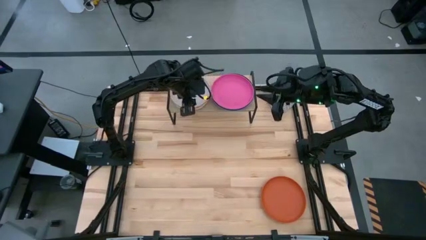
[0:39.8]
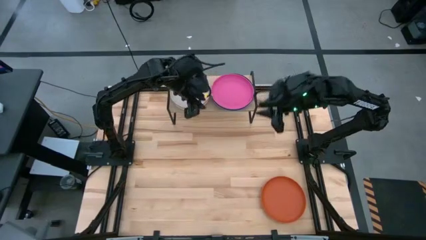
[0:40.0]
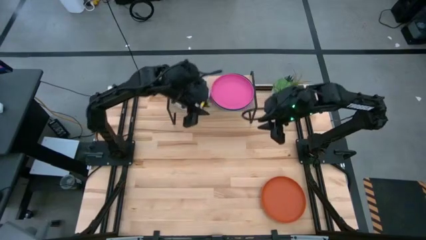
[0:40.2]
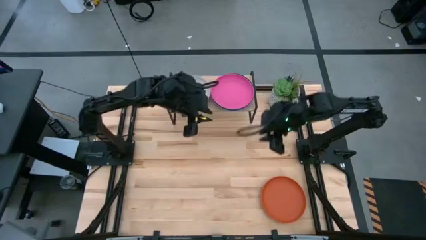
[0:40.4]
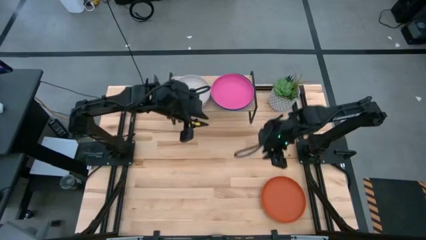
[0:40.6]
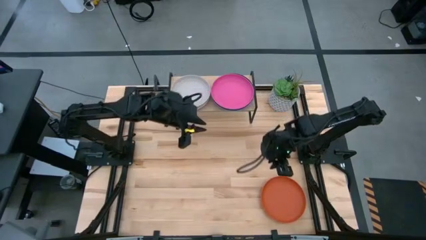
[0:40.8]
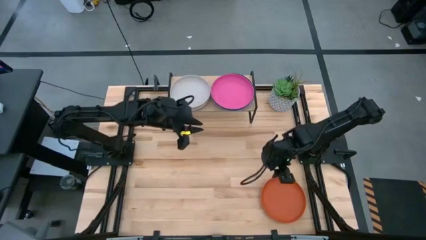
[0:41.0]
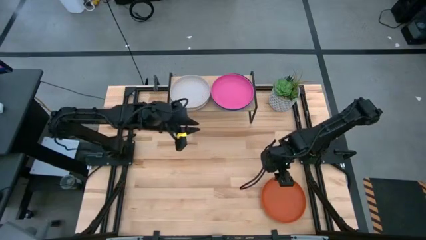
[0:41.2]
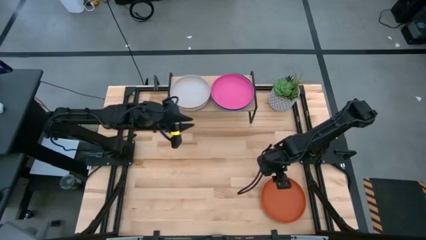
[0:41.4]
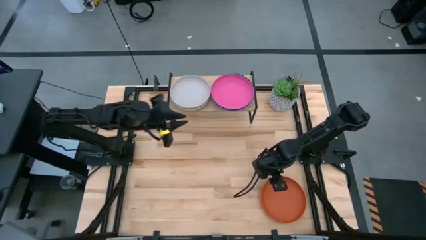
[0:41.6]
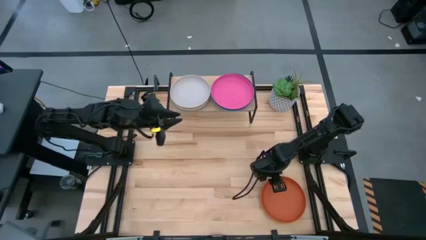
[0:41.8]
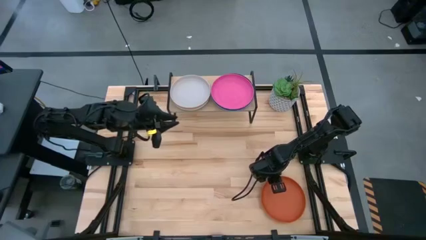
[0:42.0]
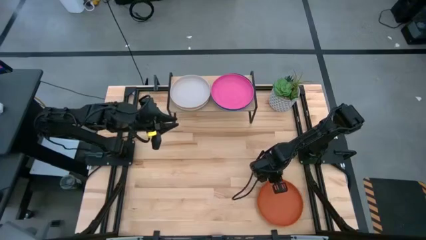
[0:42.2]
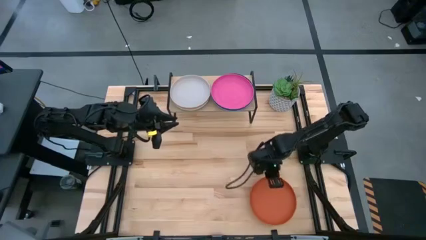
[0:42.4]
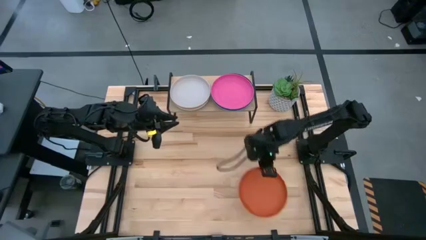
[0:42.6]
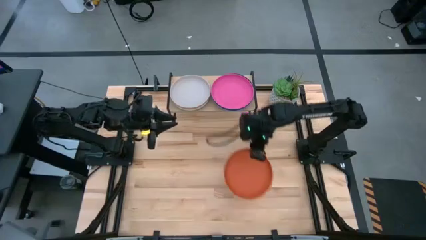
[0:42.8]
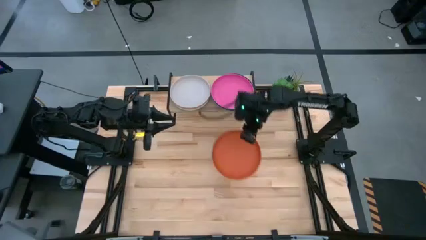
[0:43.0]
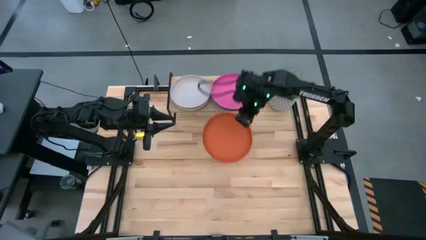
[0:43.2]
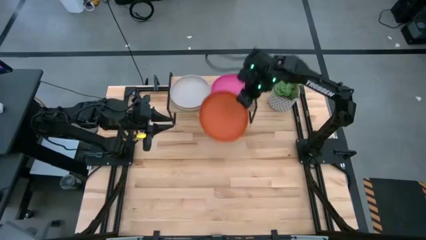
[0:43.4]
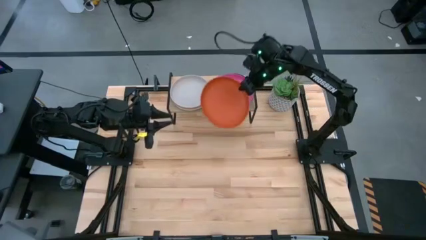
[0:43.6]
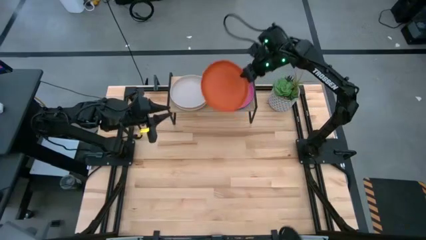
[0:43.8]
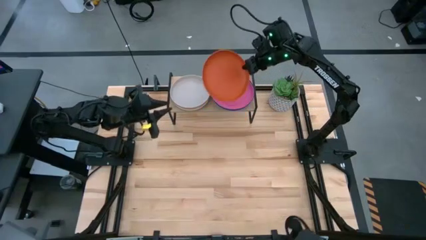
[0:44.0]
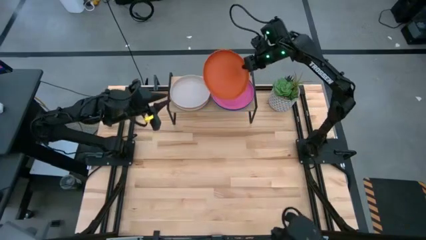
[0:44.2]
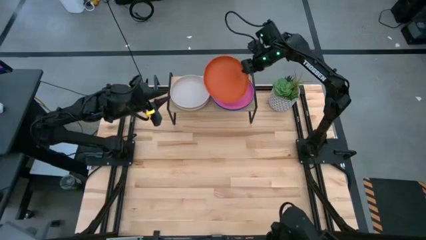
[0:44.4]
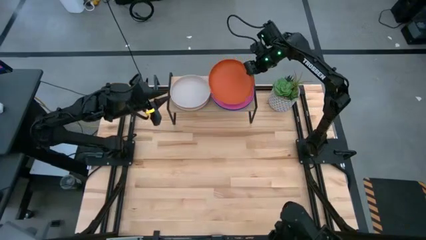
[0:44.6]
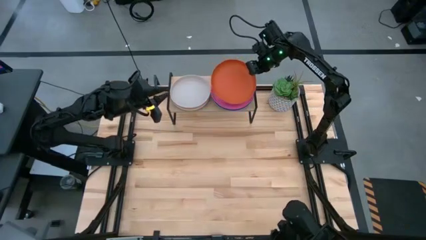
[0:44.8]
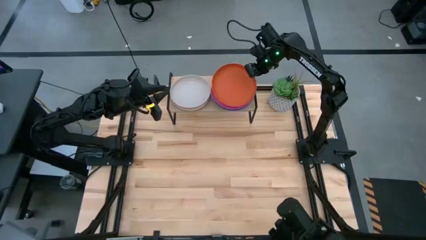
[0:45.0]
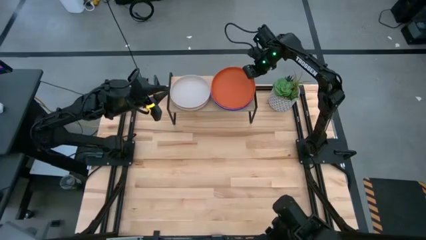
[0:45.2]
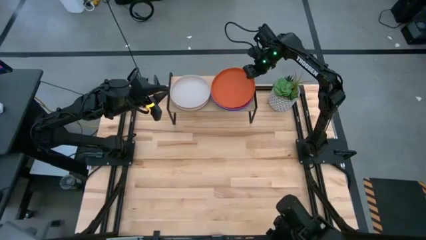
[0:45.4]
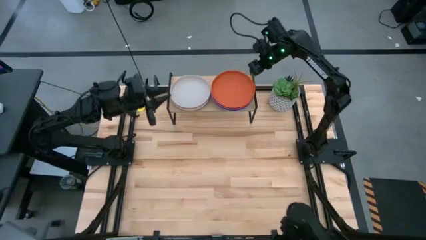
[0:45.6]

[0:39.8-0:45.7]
Task: Place and stack plates onto a shelf
Stack the orange plate on top of the pink plate on the shelf

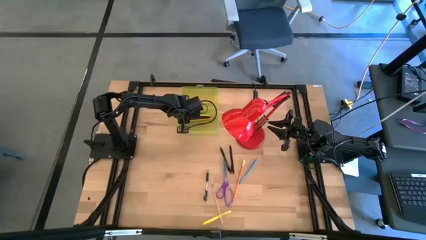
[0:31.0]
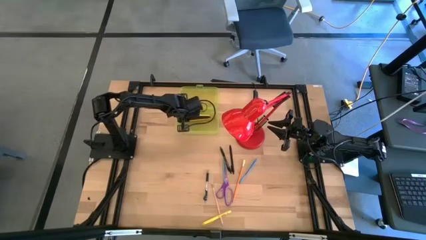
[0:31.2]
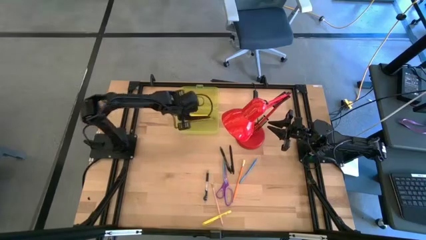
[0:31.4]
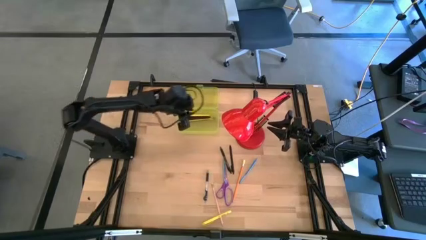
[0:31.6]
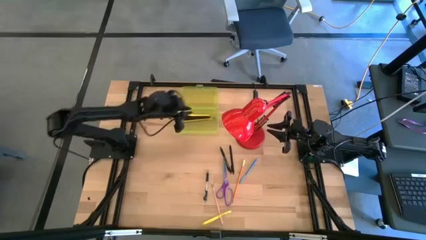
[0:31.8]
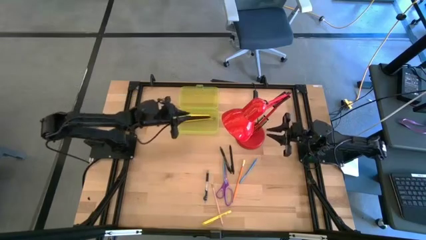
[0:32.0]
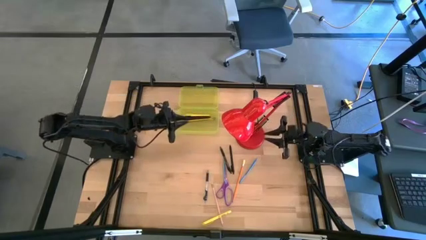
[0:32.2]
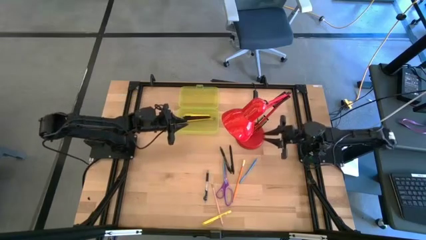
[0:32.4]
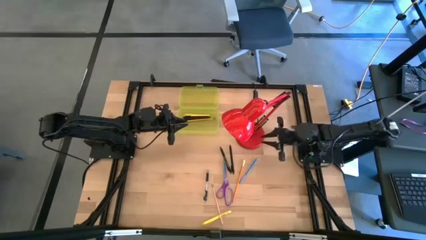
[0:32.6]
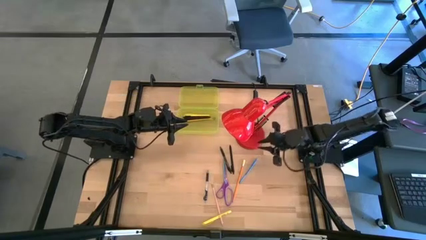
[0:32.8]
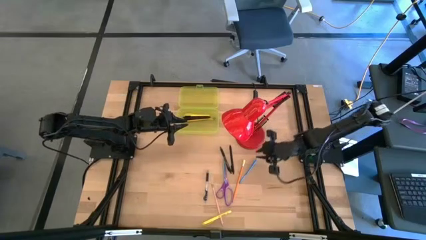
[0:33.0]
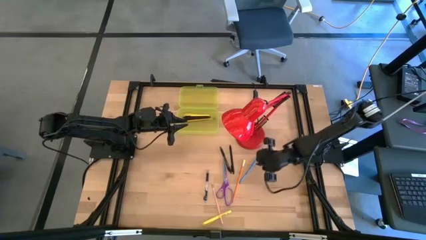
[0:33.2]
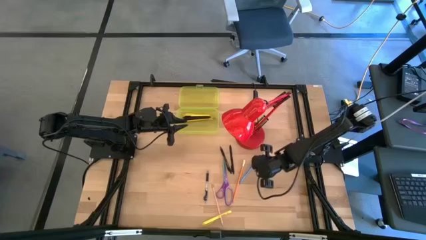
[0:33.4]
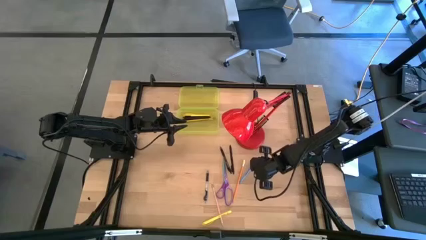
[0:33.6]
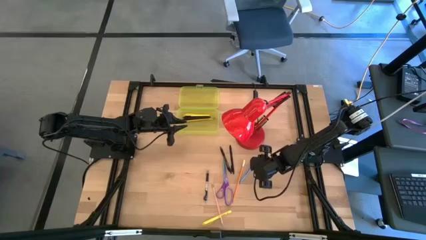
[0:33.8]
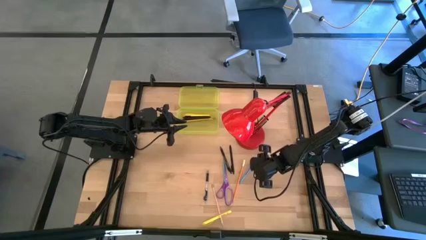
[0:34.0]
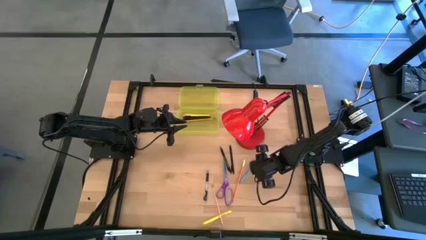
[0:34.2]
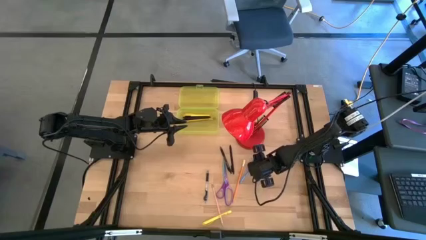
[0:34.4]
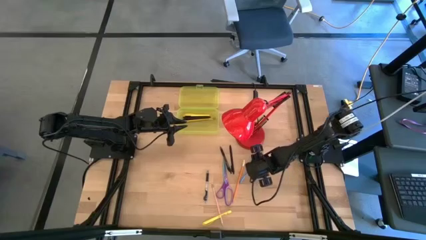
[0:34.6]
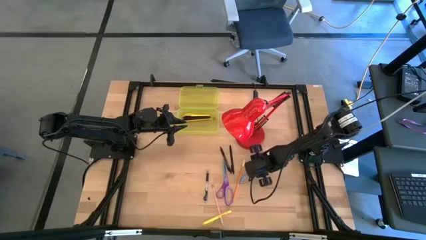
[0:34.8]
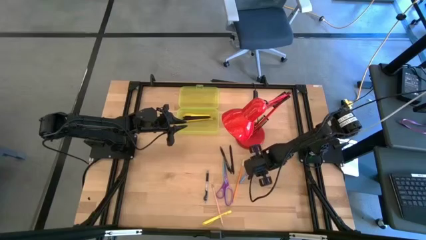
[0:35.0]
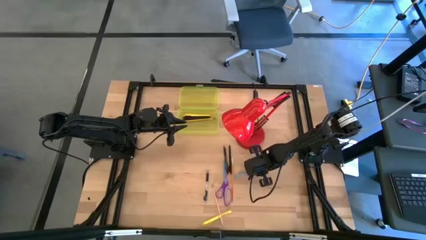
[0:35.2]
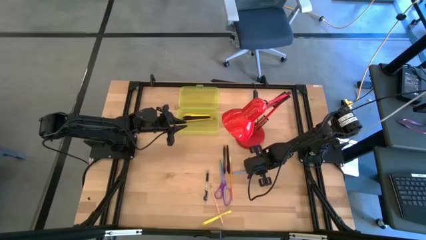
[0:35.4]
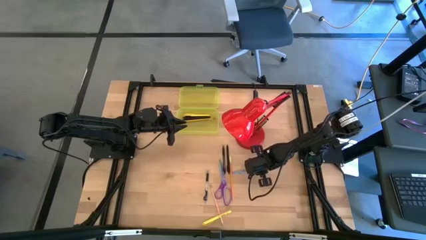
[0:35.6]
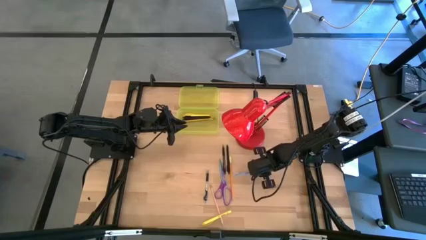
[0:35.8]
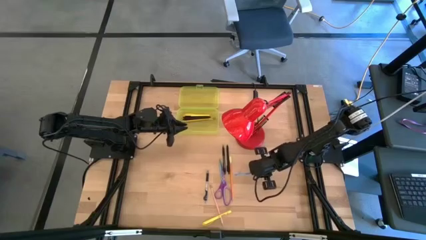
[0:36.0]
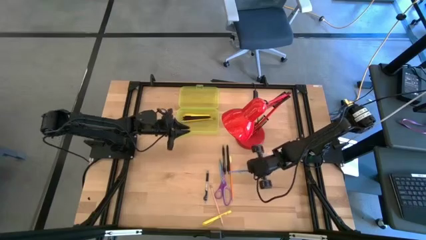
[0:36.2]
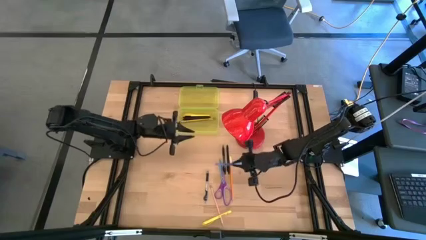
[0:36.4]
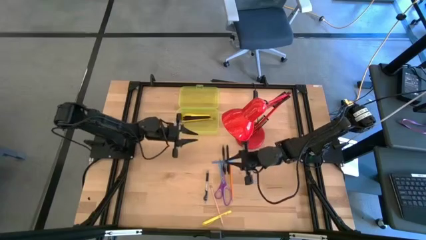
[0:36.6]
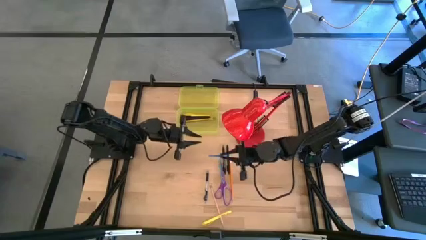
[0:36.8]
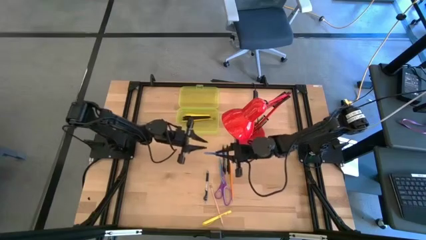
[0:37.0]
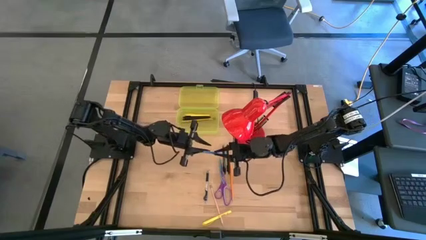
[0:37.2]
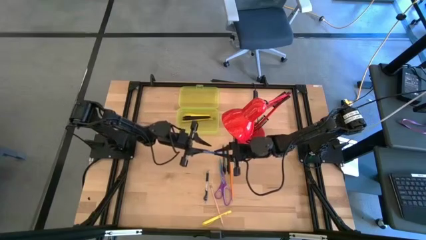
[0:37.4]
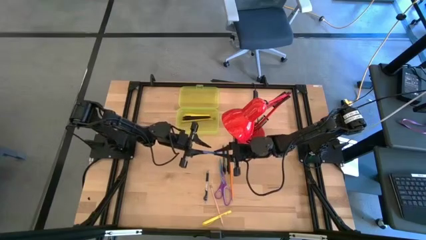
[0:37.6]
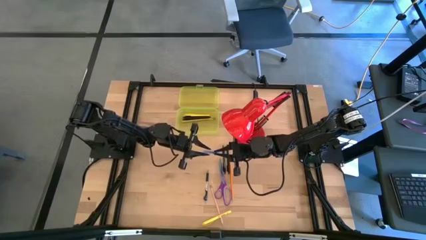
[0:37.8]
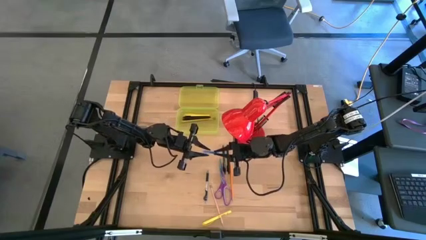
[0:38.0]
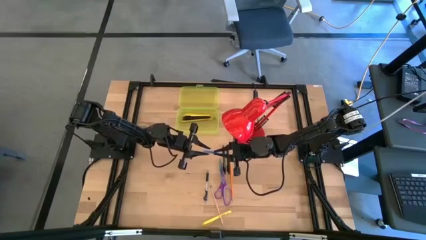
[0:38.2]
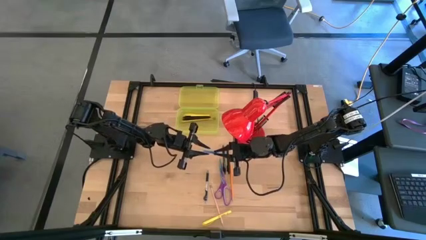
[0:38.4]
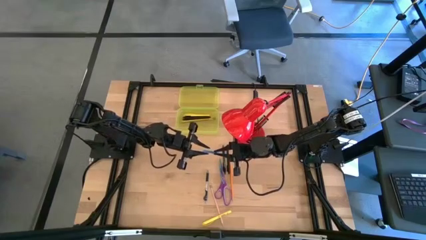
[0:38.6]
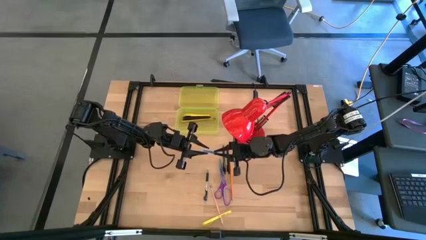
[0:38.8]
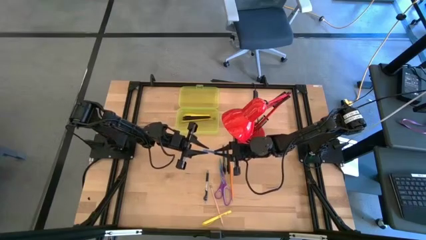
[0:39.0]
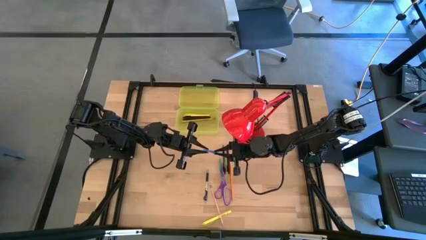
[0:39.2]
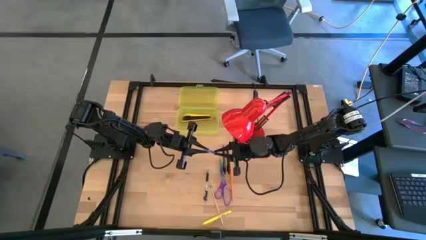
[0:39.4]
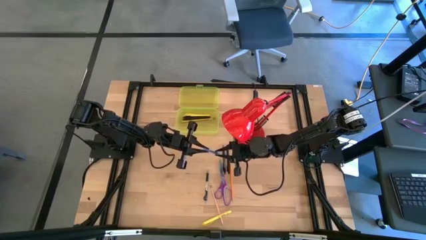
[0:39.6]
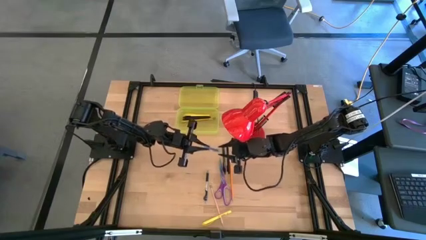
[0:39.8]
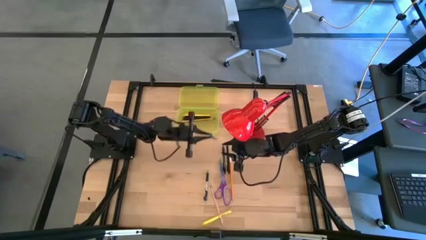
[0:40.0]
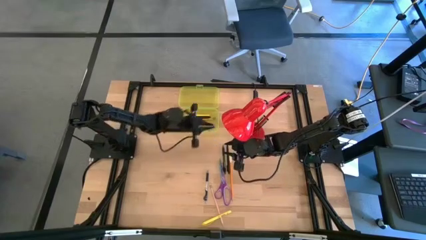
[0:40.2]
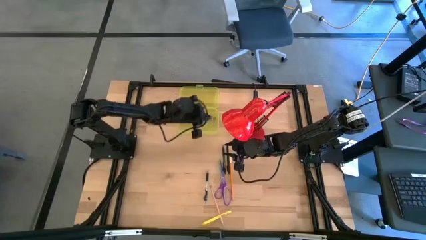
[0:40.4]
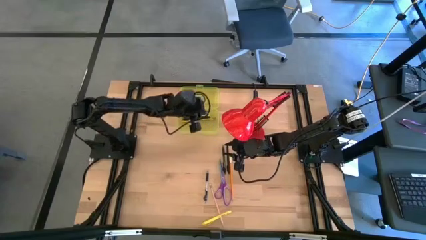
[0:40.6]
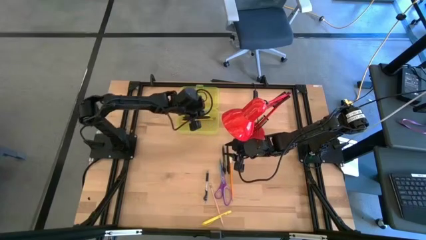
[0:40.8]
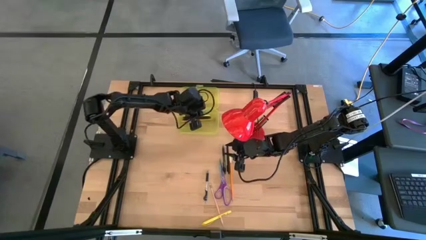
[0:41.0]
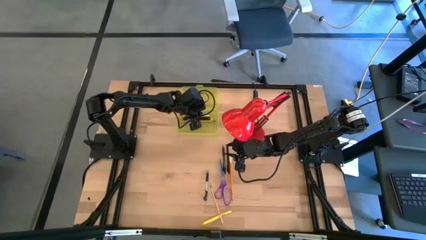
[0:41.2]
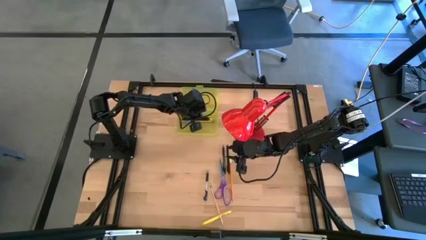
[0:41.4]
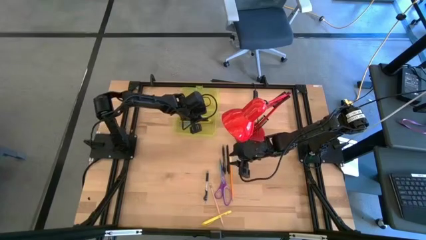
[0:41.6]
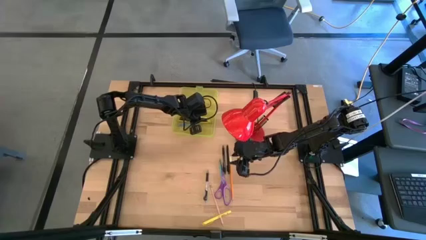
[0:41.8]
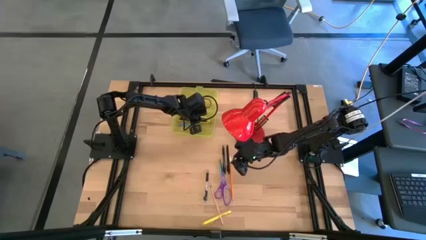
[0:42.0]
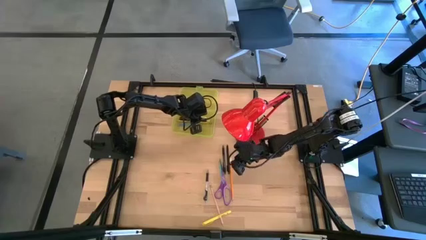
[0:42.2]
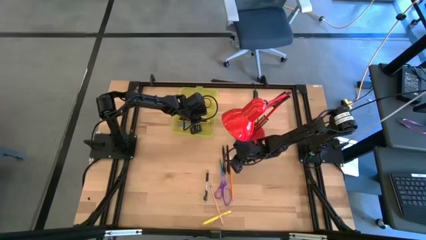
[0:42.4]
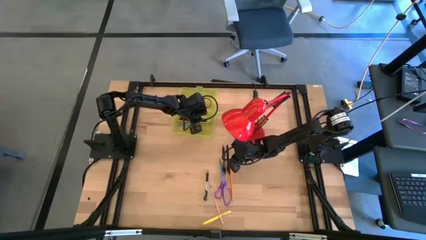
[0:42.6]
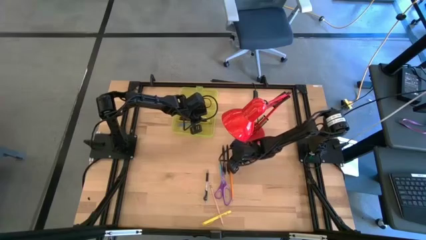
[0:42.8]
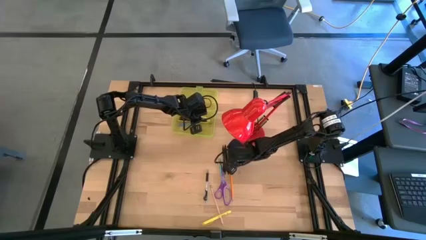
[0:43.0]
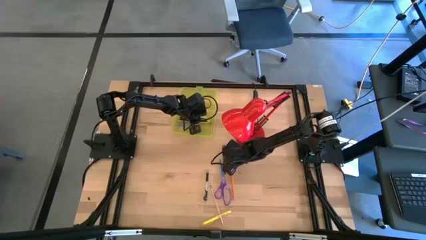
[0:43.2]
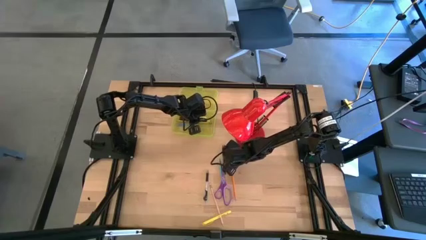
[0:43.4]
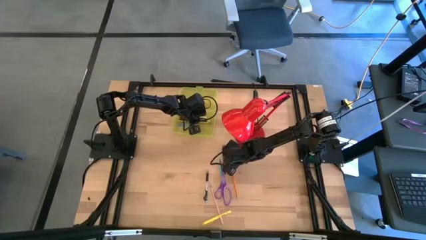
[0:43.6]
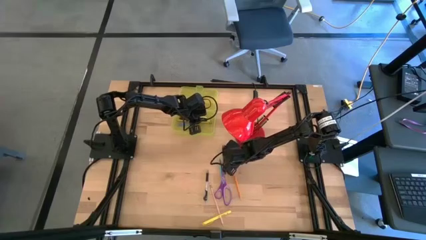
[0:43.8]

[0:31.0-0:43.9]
Task: Pick & place school supplies into a supply box
Put the light blue pen into the yellow supply box
